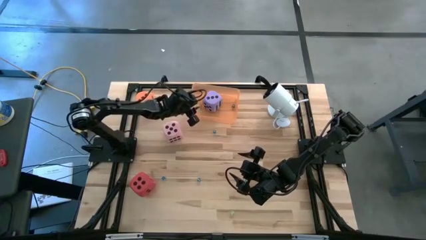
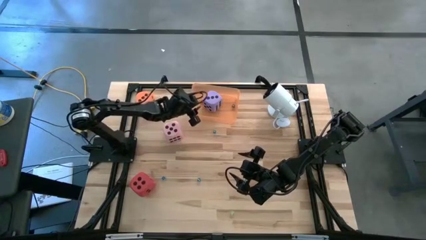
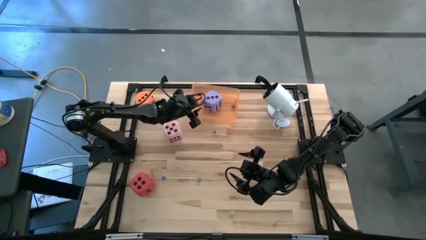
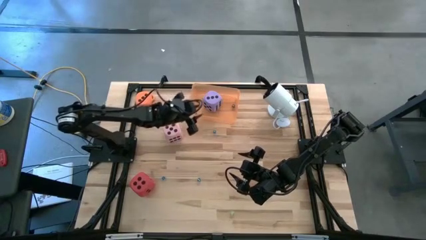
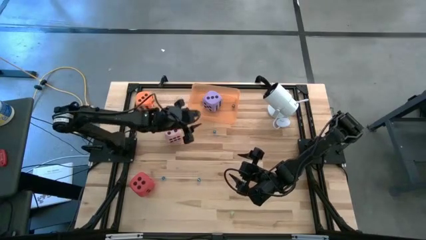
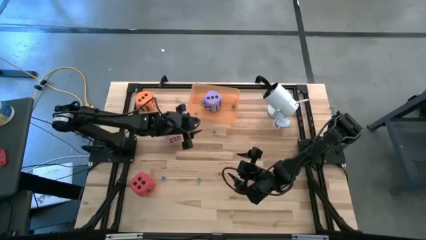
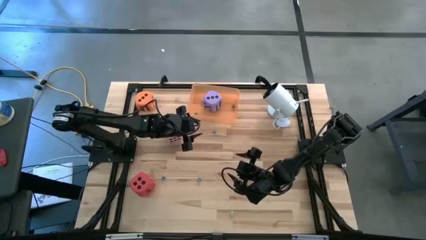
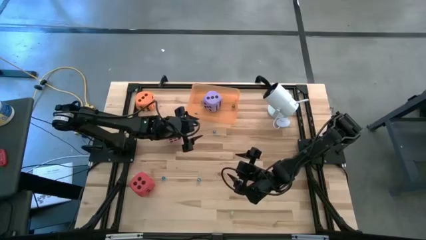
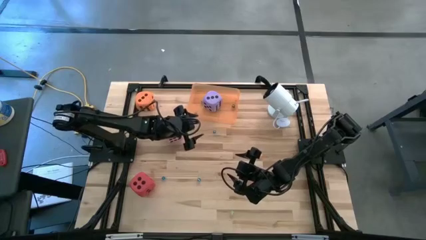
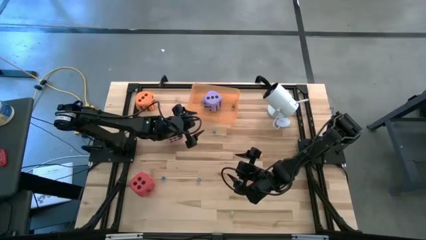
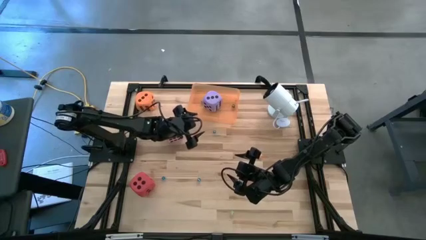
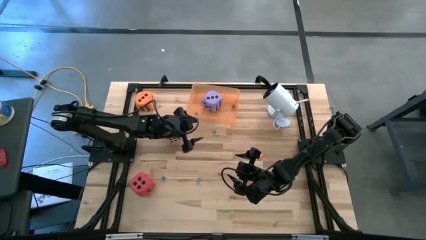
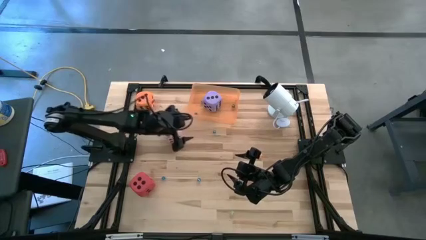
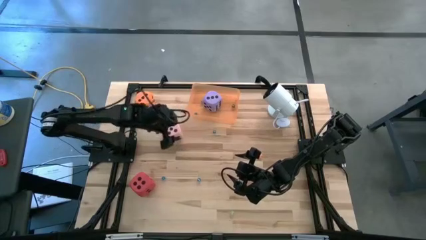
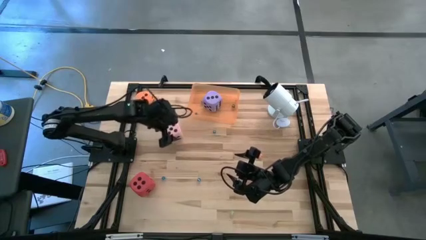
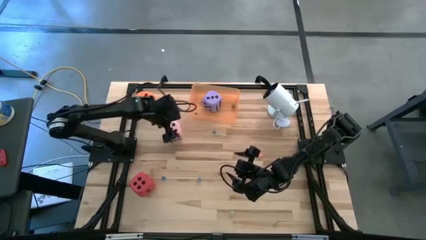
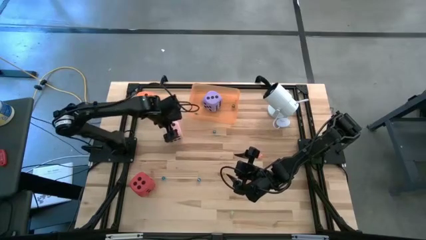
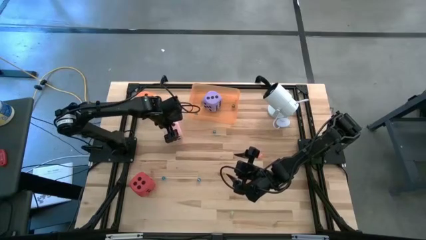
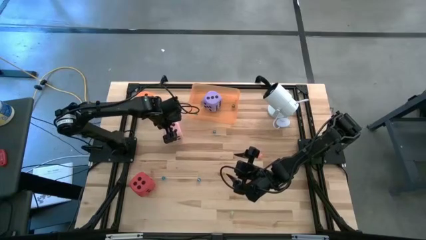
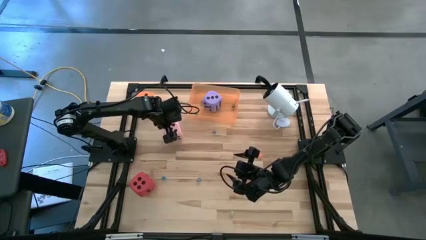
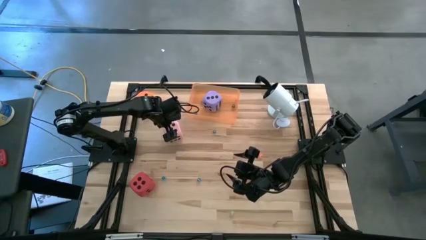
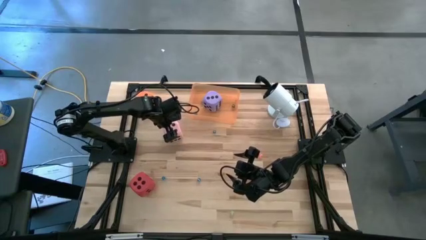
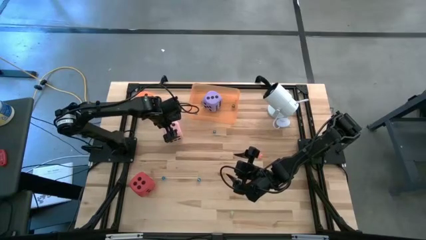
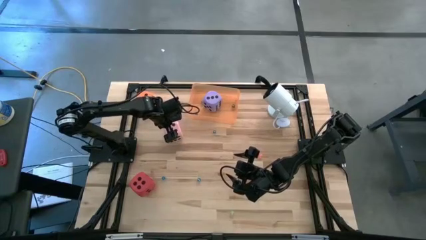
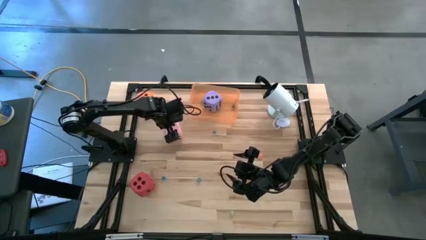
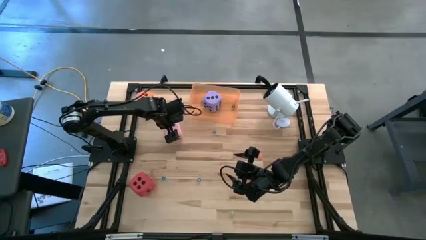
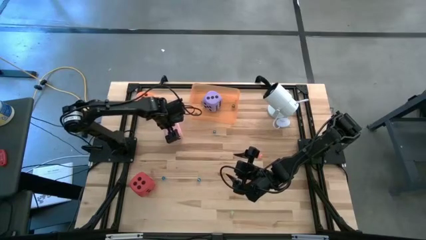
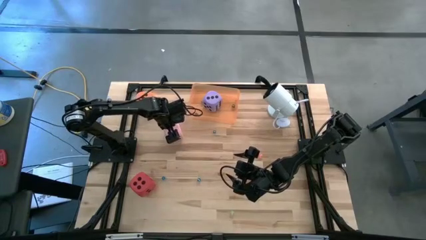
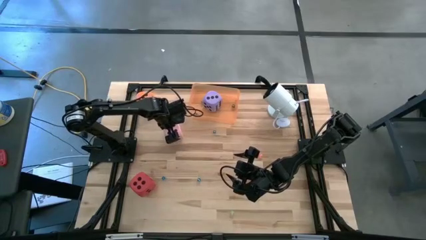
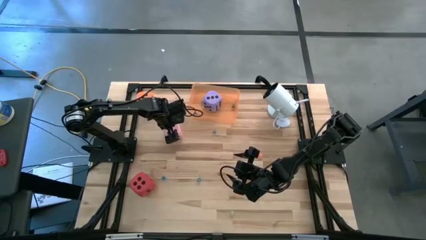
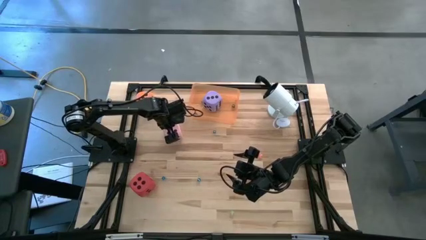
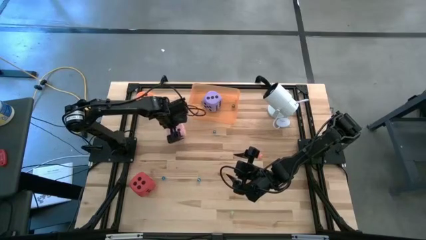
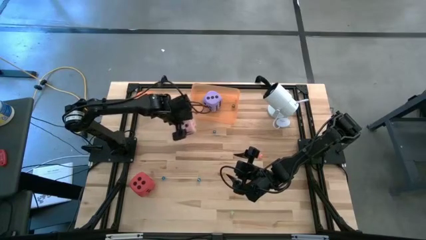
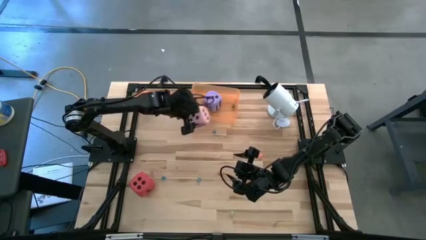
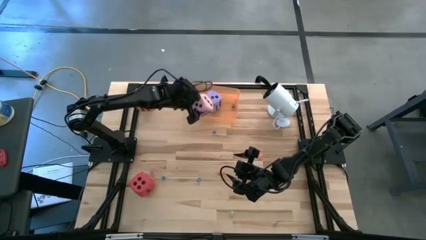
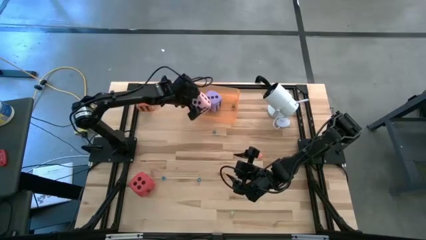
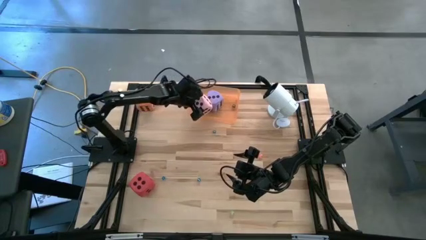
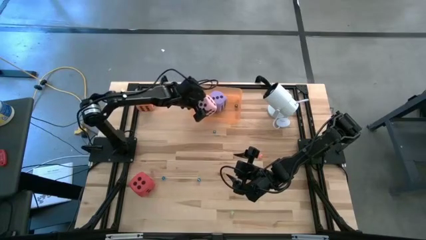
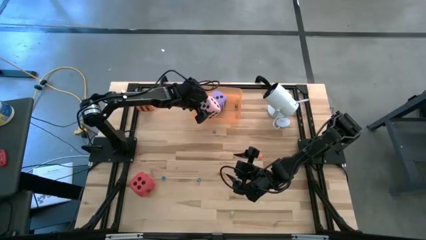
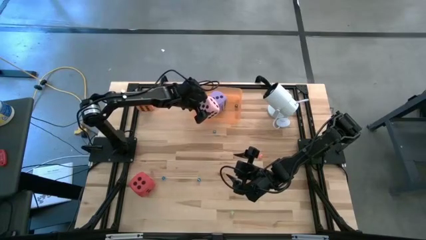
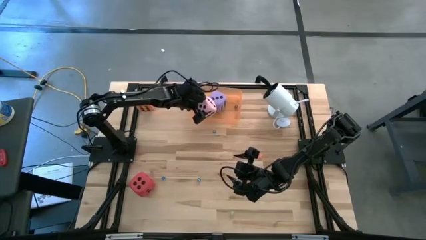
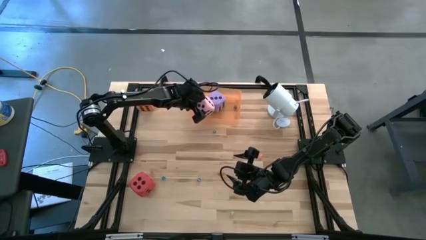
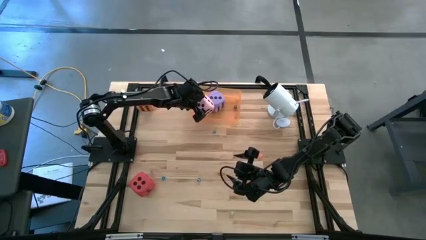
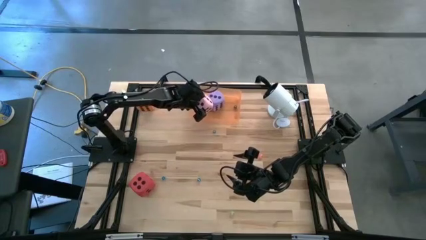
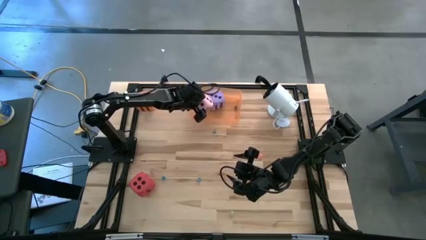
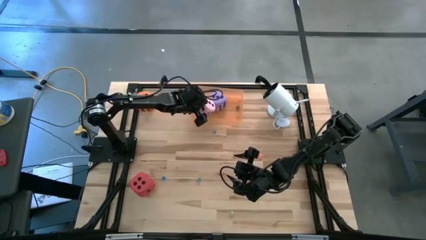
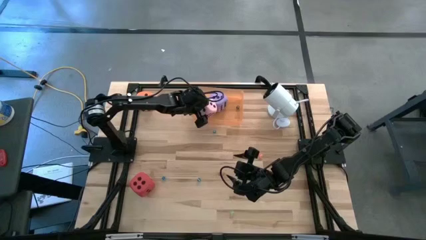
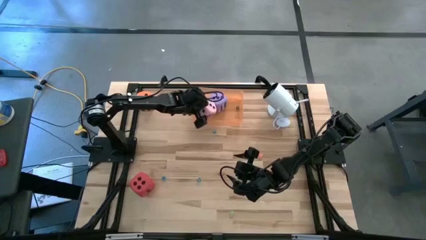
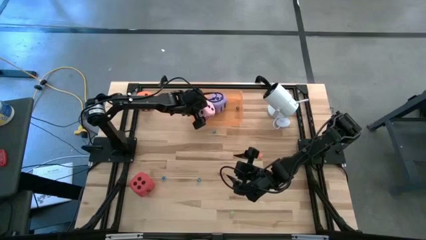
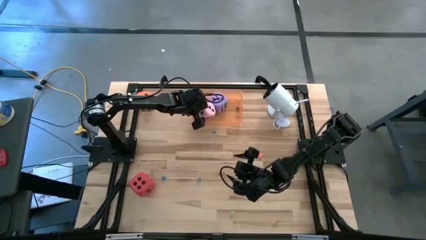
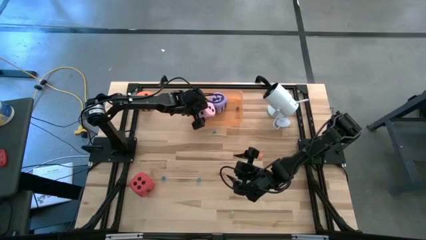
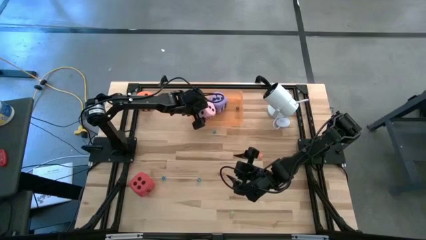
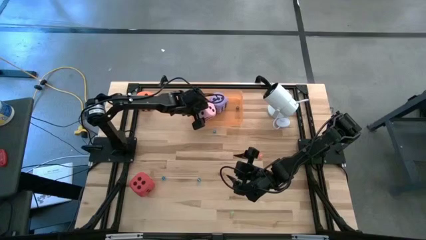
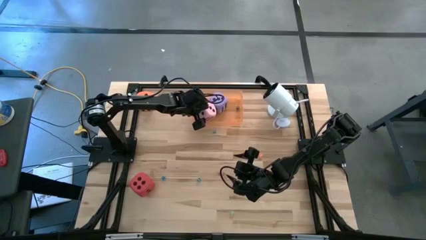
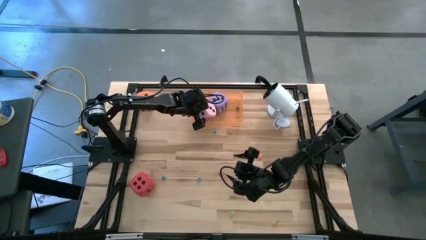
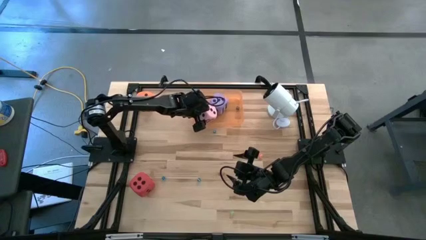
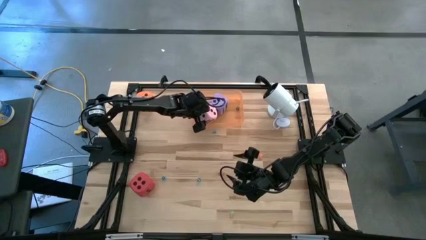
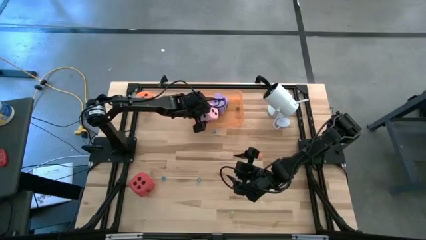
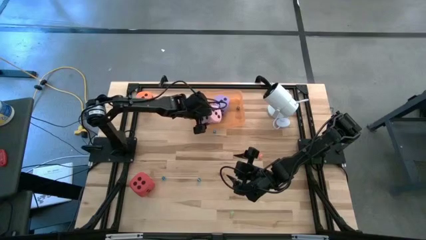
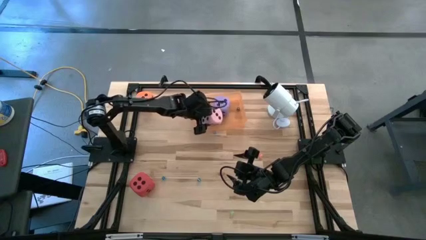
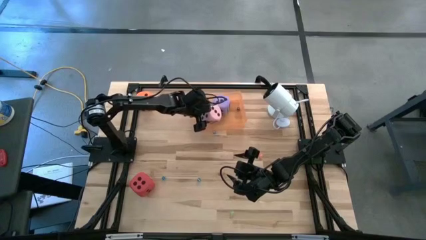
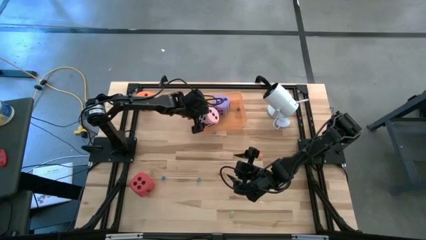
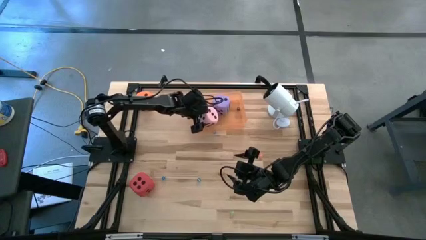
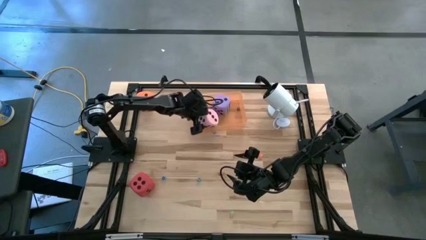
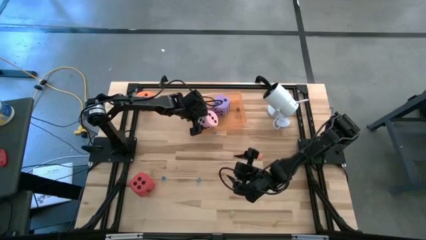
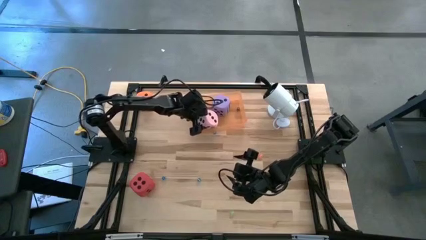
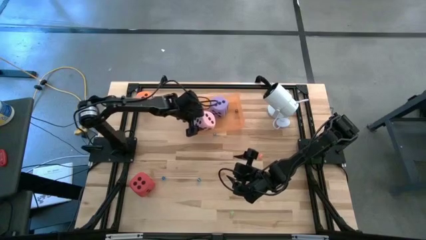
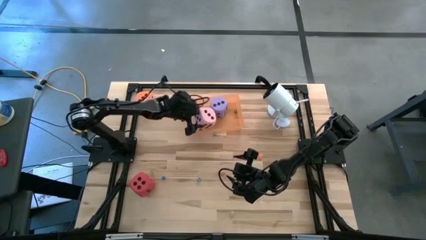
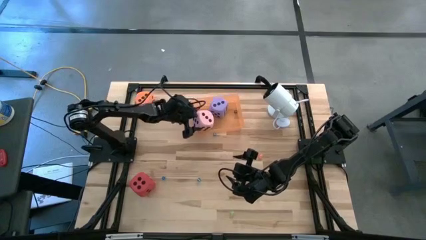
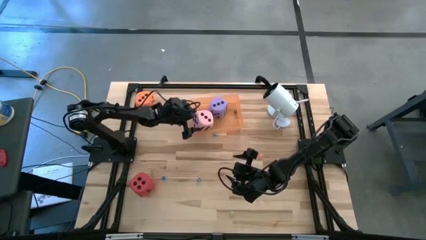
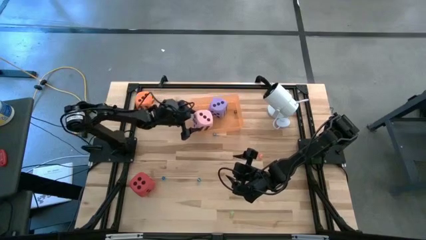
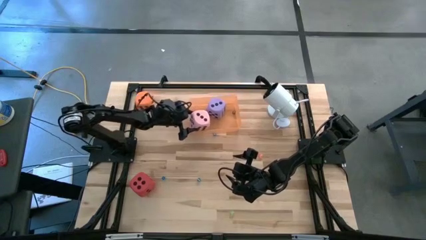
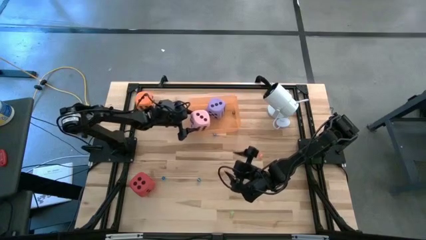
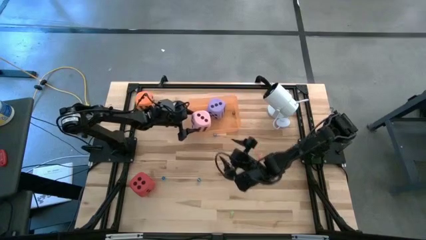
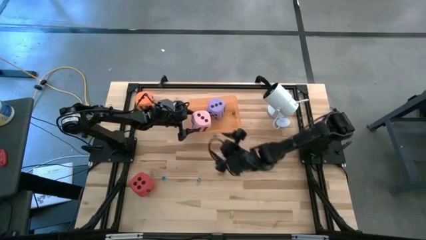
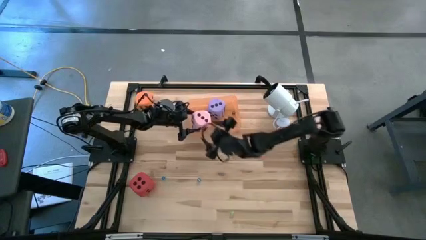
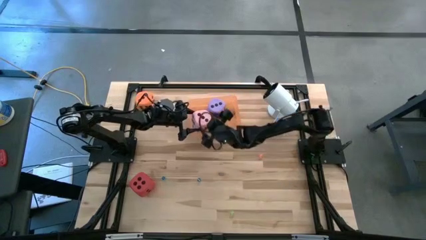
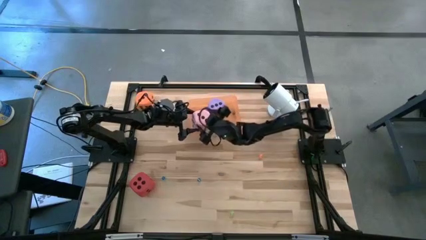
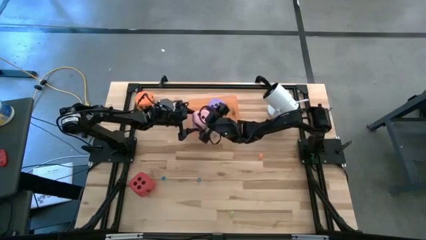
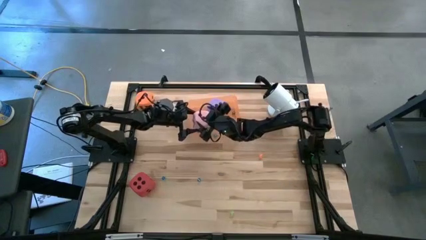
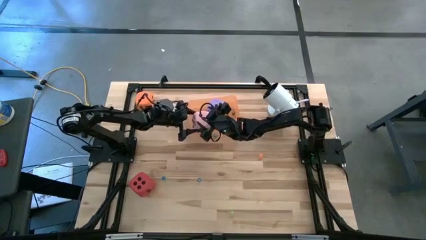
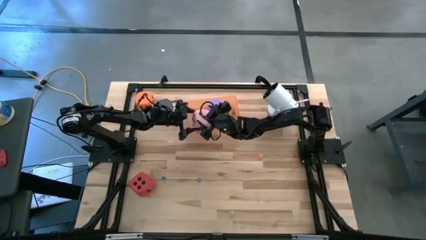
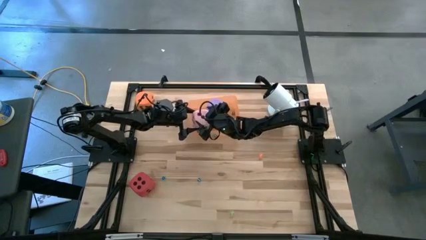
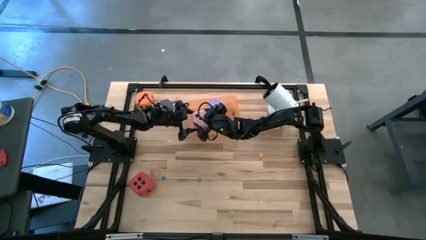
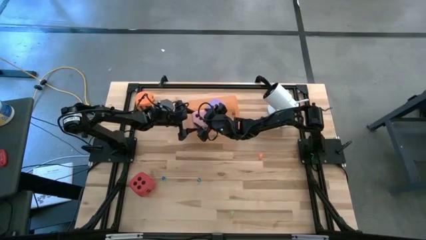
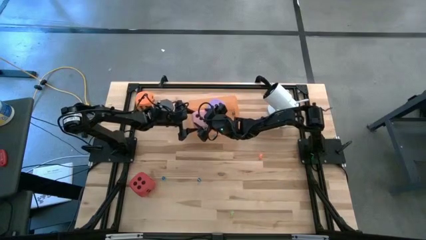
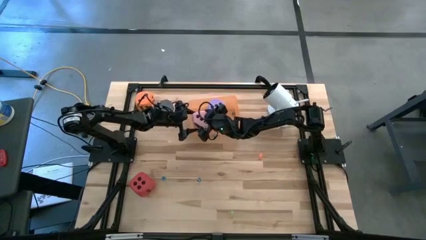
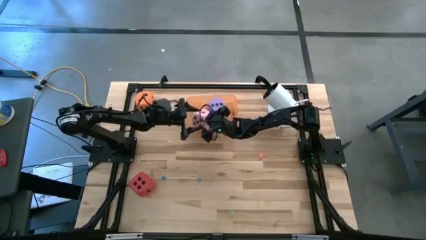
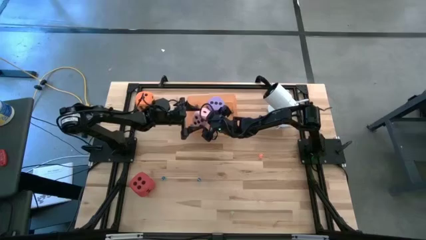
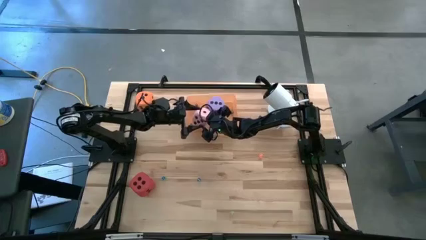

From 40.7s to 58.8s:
Task: Pick & Place Dice
Put the large pink dice in the orange bin
